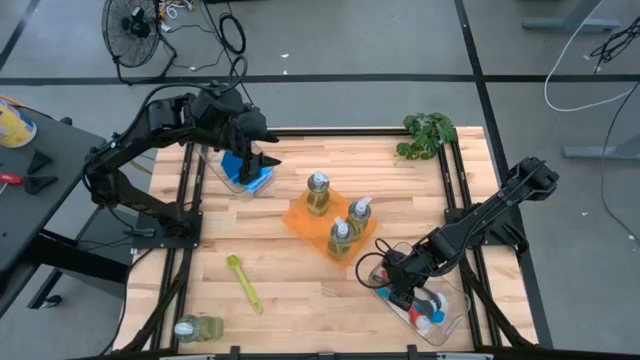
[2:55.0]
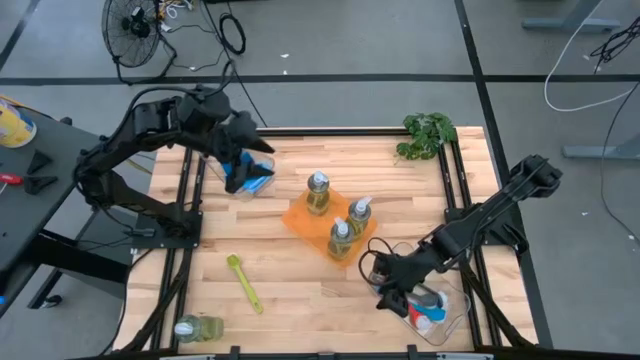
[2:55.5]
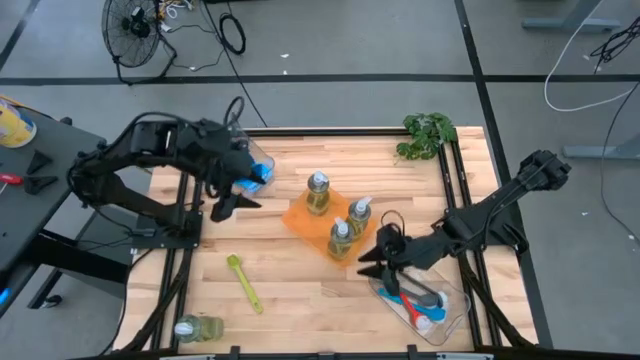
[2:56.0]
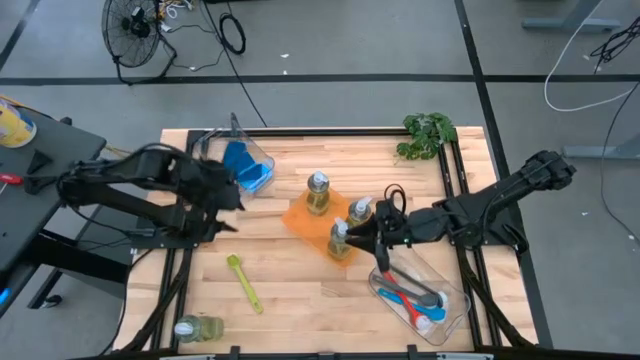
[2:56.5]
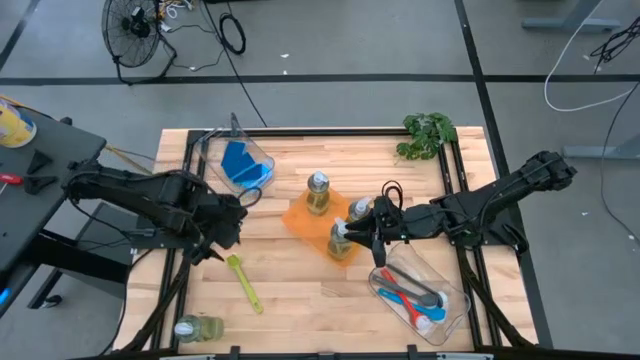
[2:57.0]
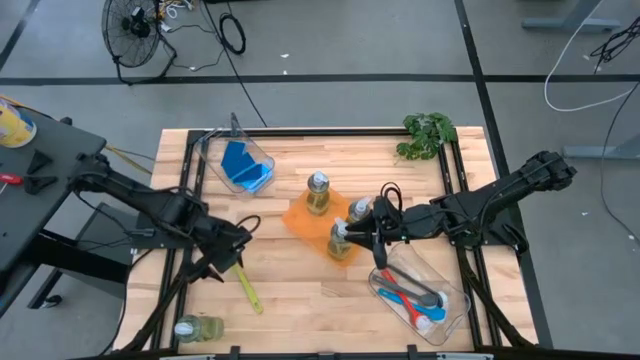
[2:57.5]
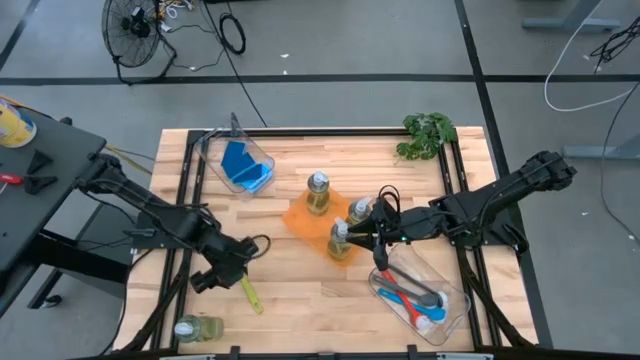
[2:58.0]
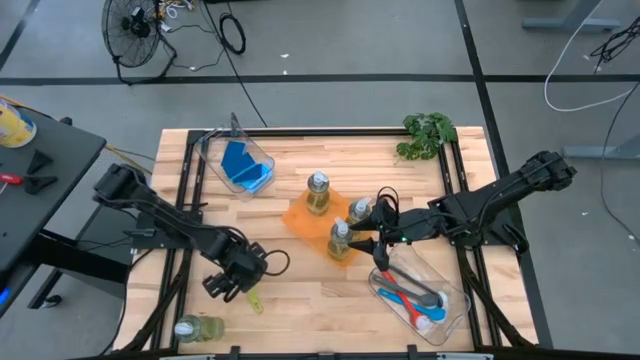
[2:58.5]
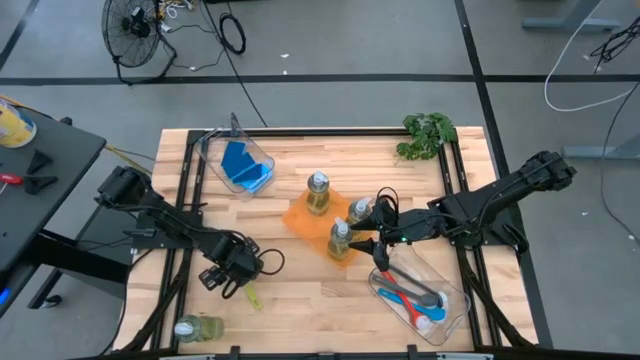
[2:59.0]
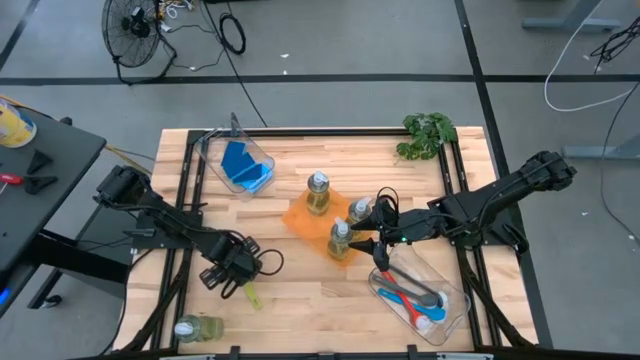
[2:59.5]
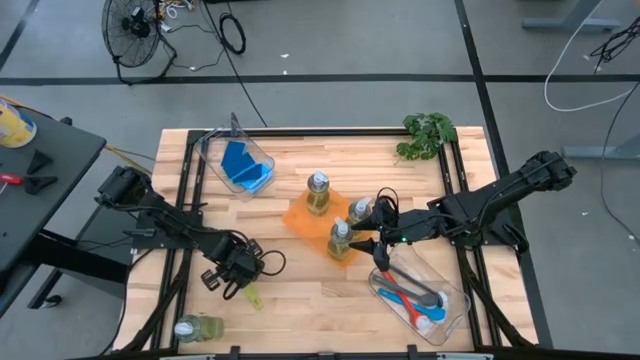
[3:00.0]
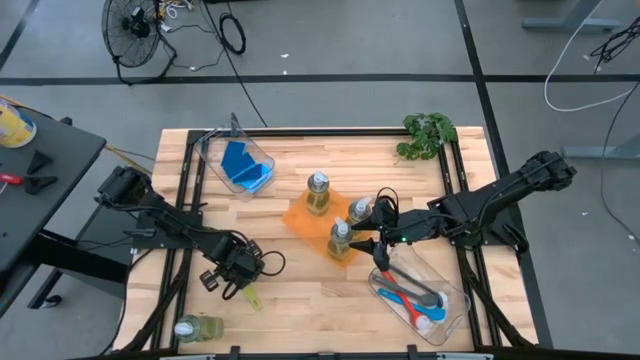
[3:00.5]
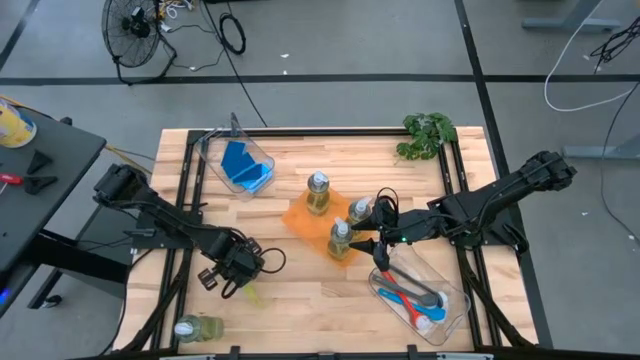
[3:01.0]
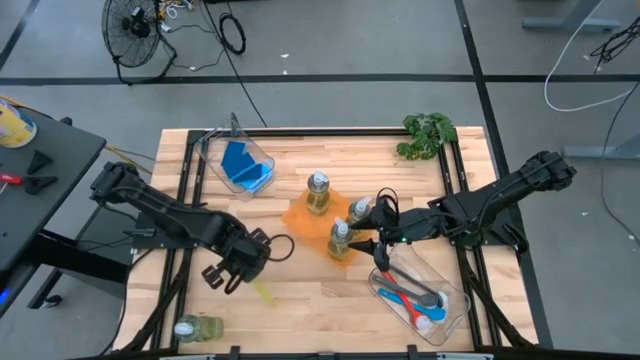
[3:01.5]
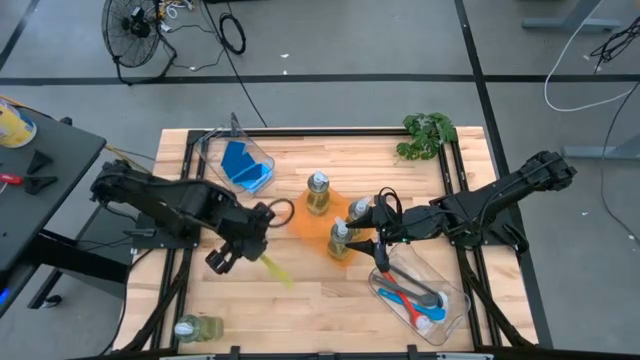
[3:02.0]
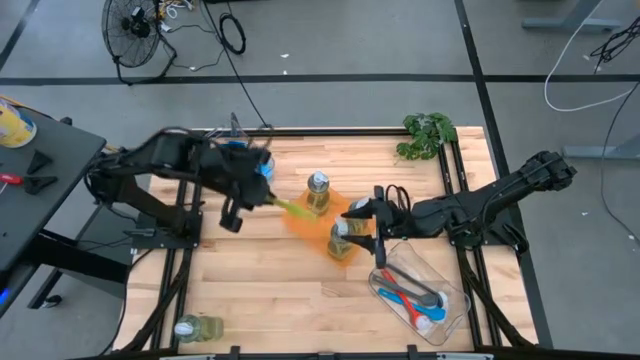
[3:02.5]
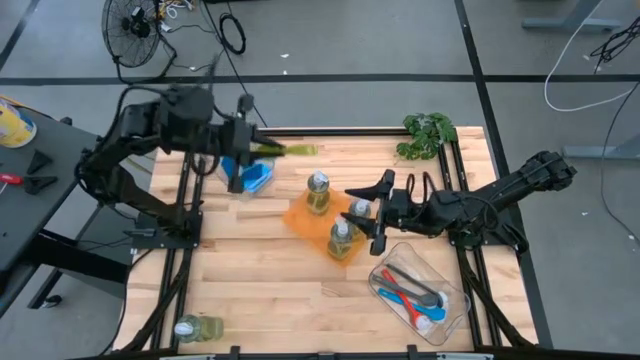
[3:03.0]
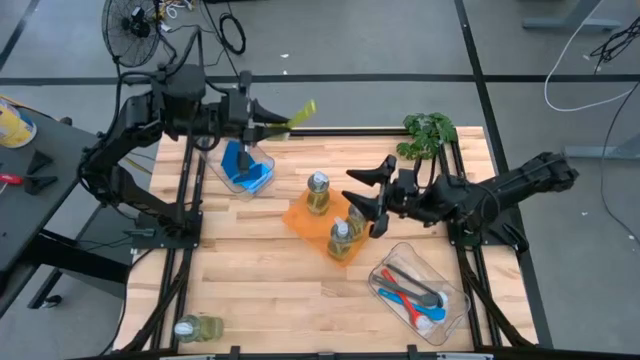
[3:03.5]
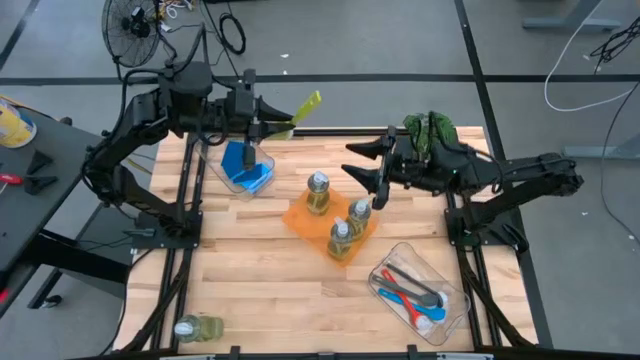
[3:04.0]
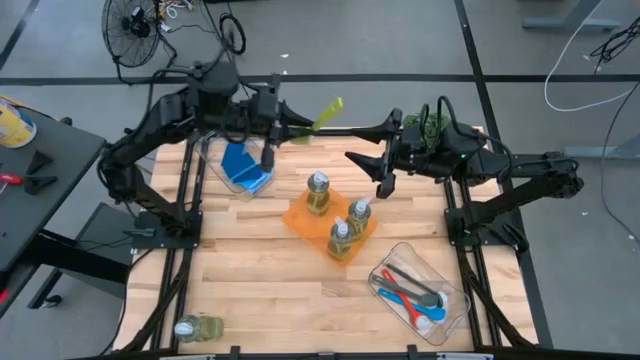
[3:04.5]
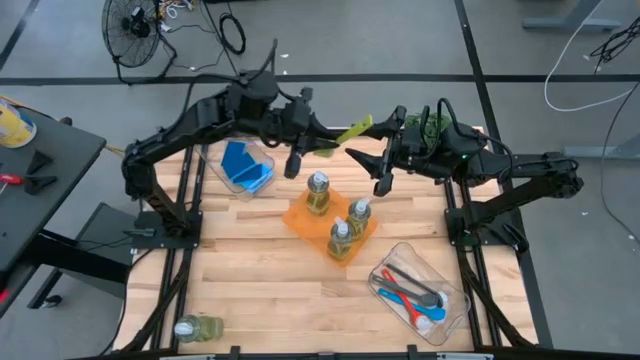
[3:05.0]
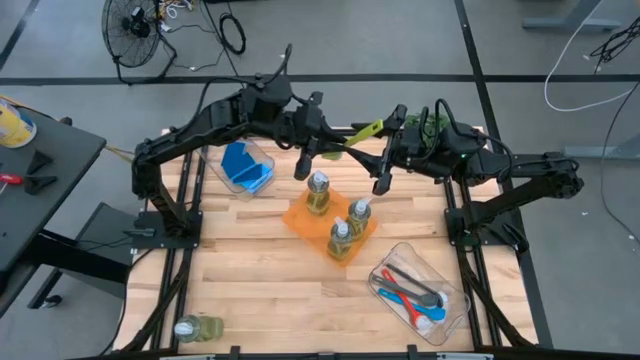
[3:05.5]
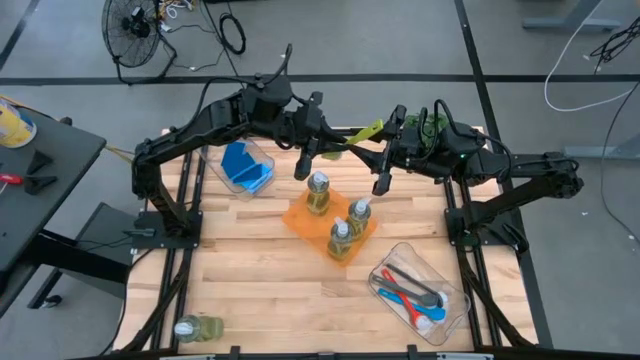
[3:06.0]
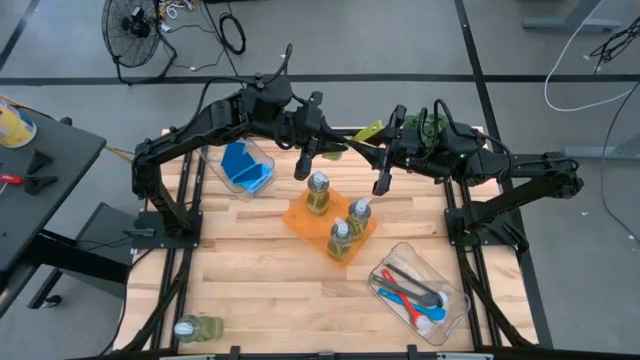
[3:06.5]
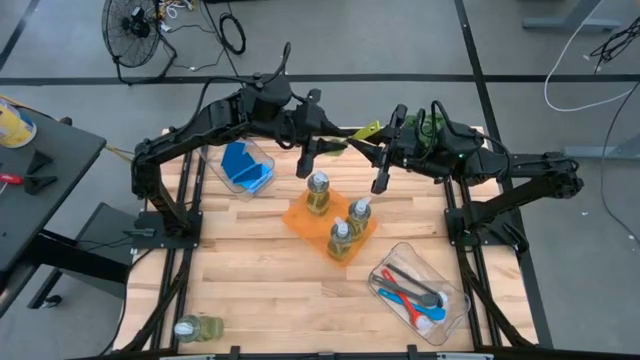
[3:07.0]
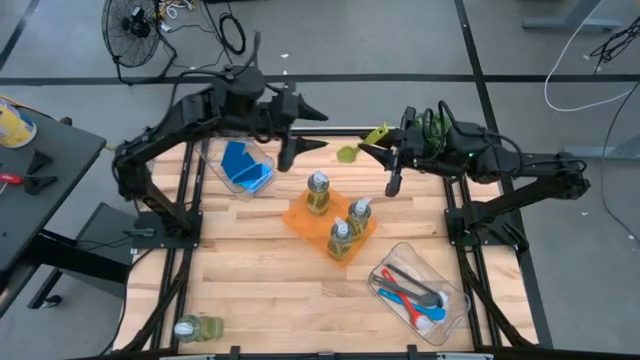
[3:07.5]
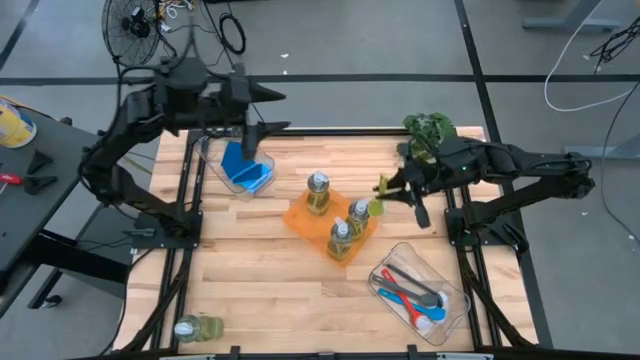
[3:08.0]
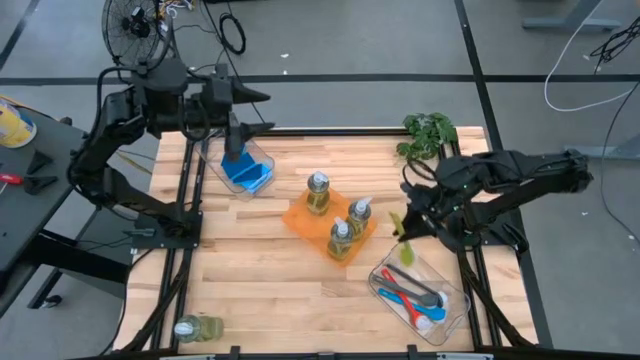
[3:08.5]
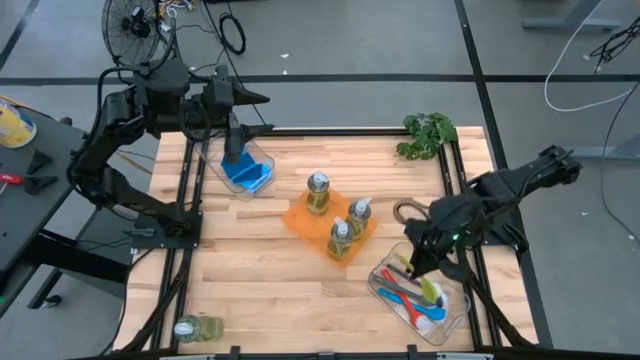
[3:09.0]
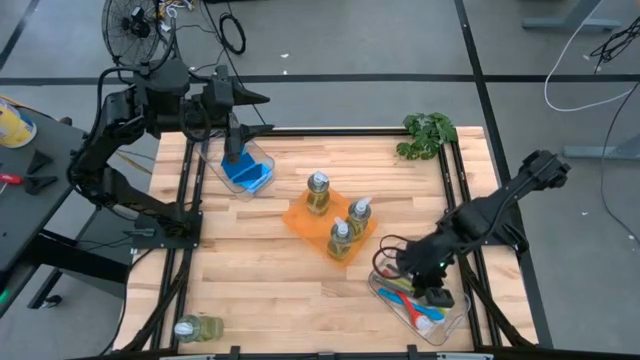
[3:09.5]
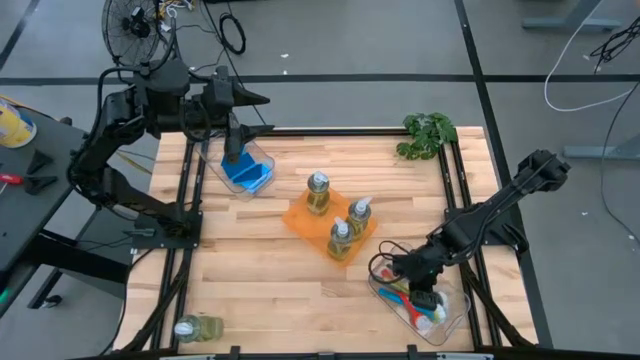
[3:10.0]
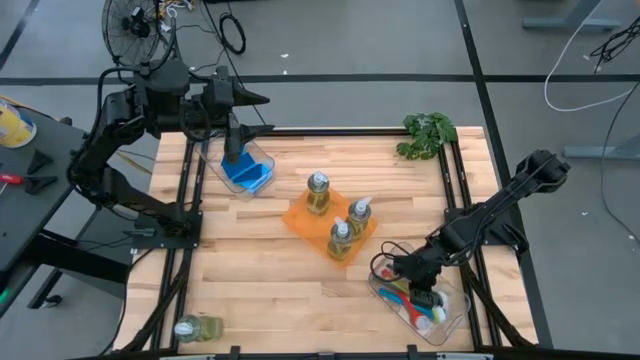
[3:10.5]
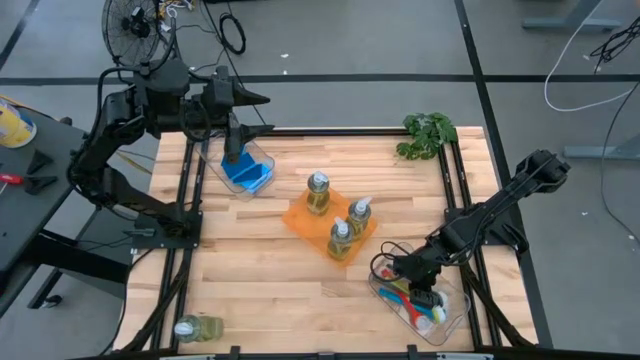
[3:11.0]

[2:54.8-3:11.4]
Task: Pick & Place Kitchen Sink Supplies
Put the green dish brush into the bottom transparent bin

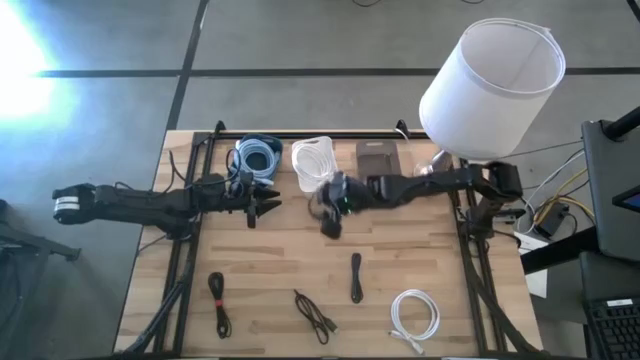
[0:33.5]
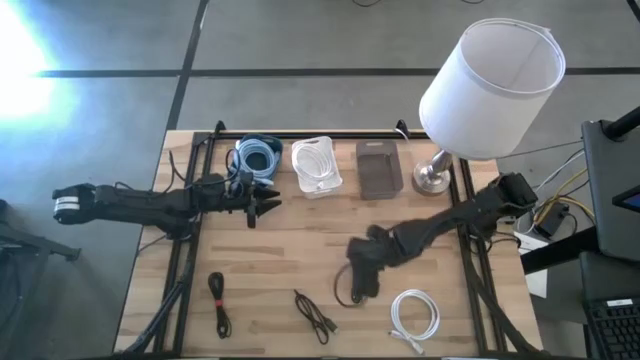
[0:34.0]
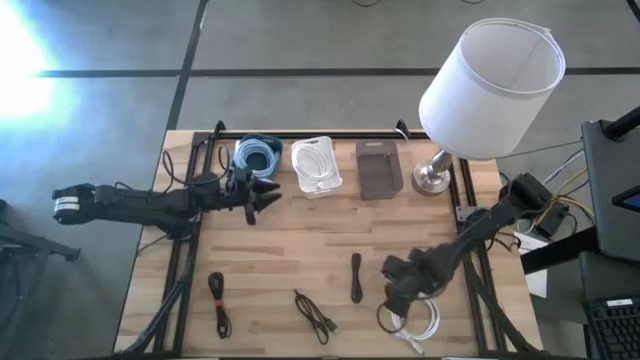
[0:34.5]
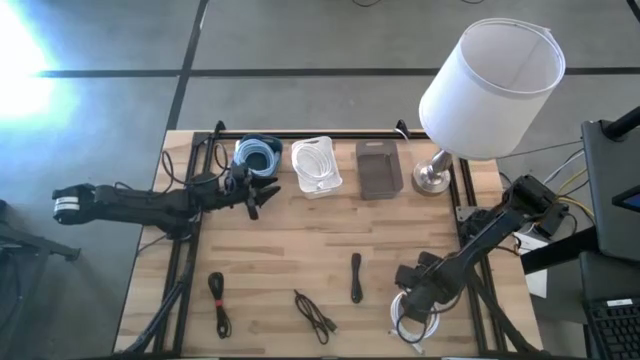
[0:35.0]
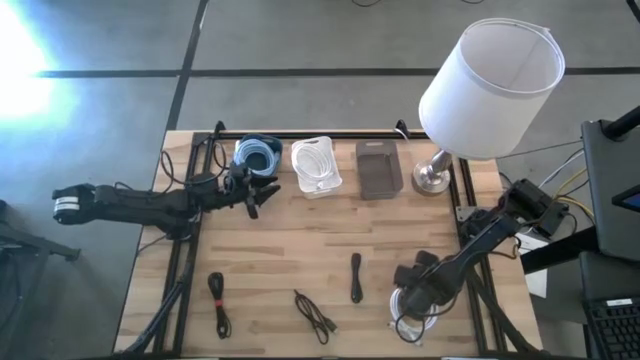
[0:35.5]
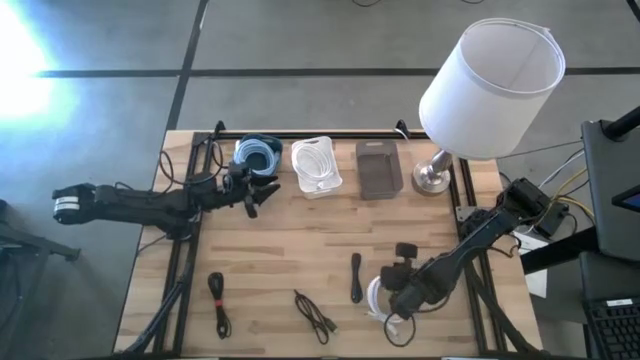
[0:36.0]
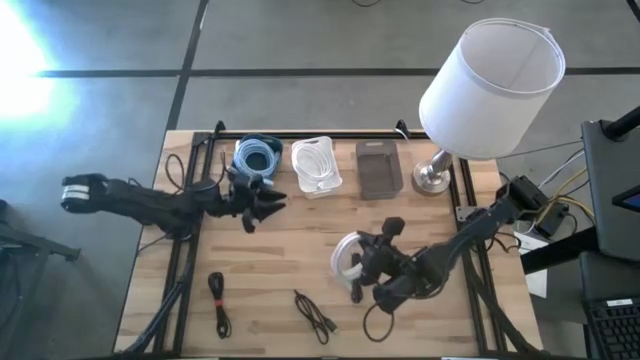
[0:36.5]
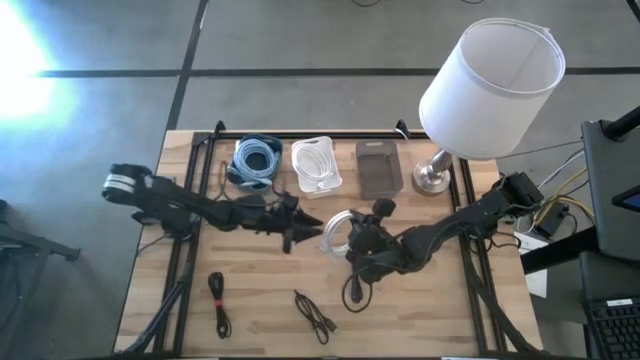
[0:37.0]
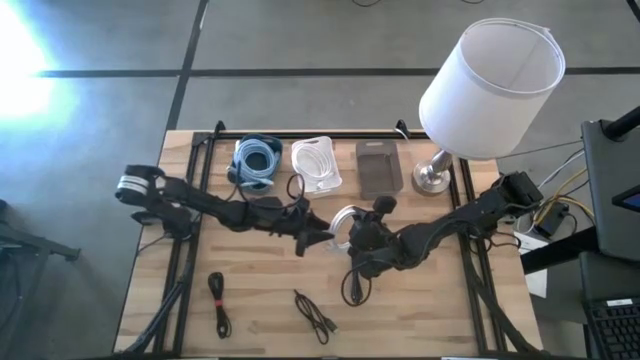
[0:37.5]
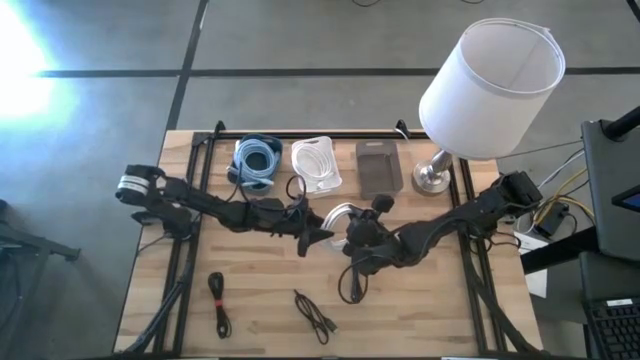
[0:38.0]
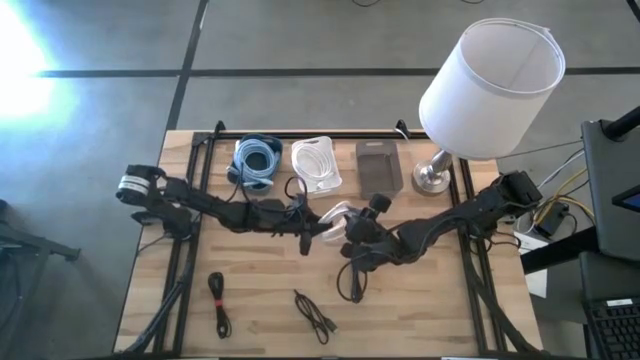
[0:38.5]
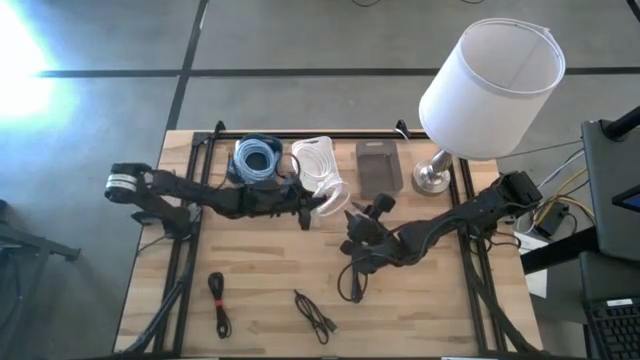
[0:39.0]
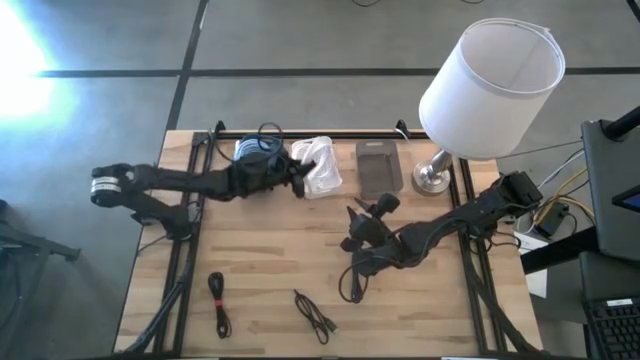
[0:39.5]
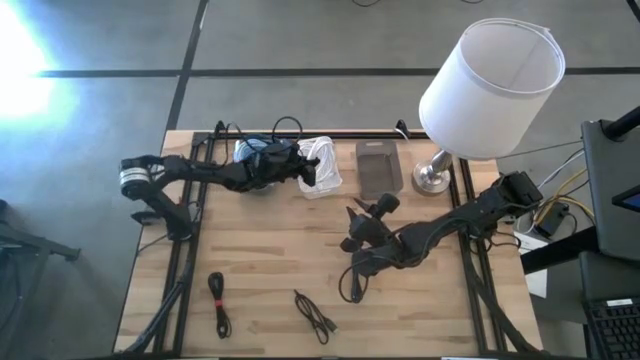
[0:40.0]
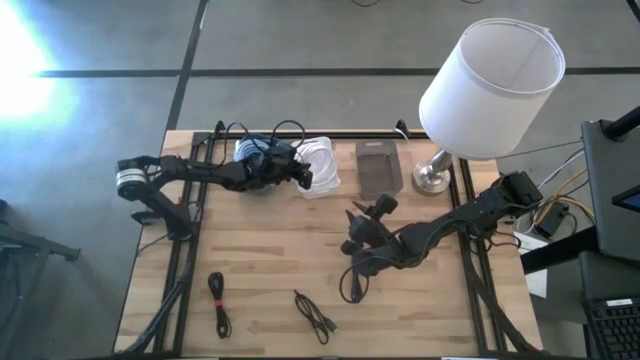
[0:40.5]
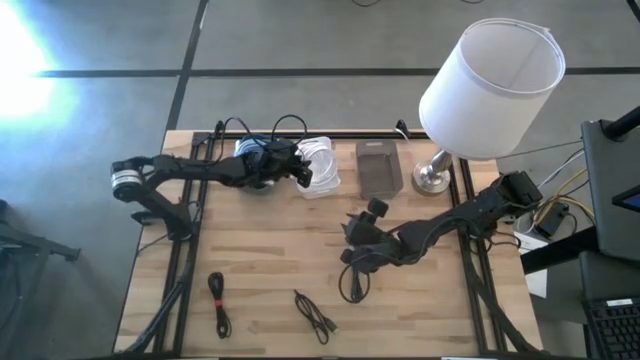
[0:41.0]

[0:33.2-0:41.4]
Task: Pick & Place USB Port
Put the white HDMI cable into the white bin
